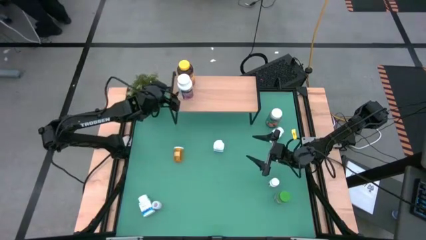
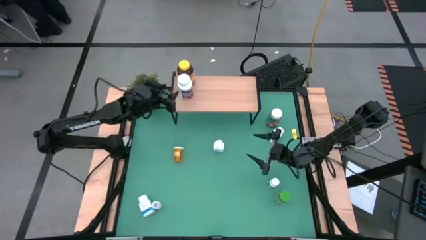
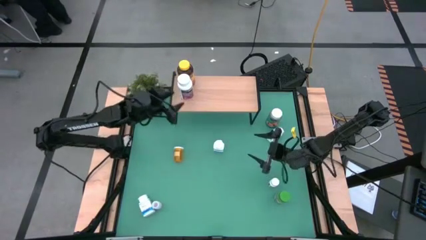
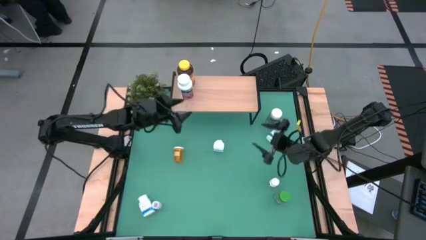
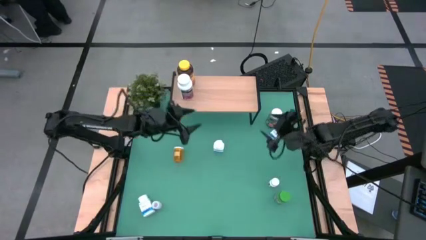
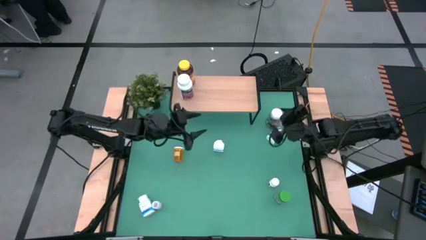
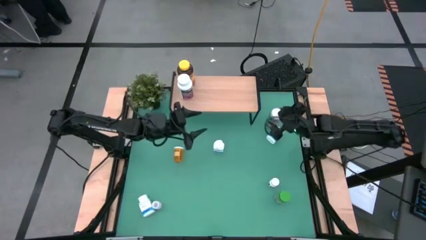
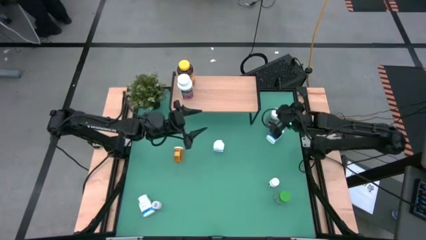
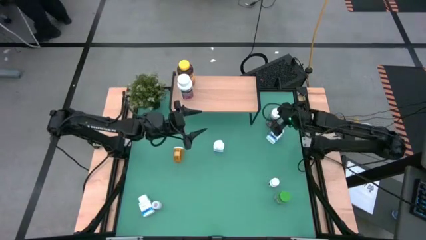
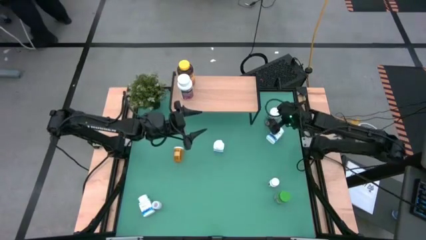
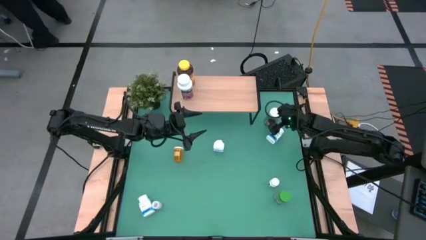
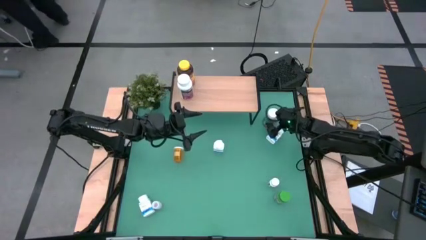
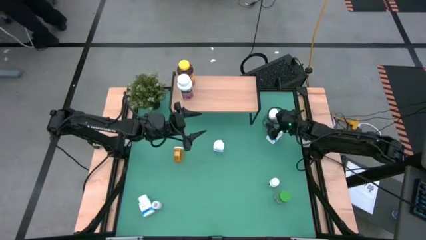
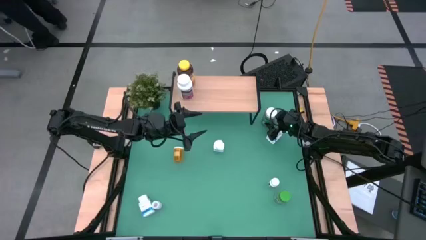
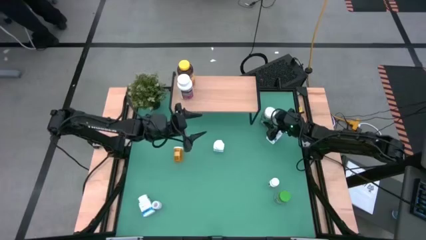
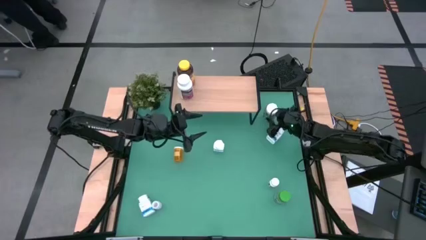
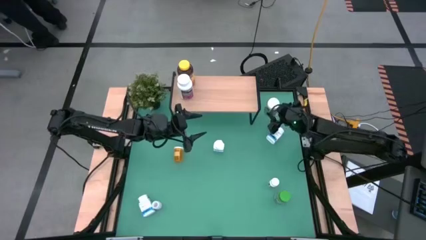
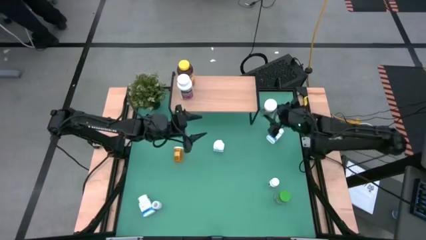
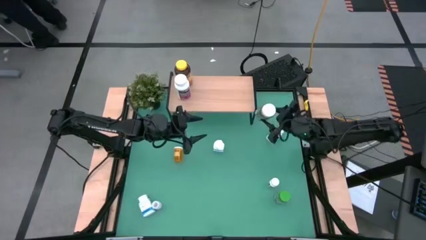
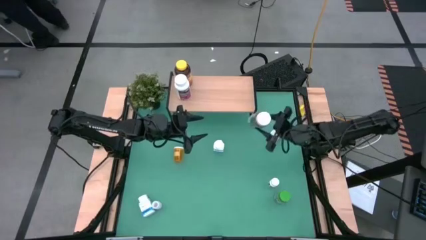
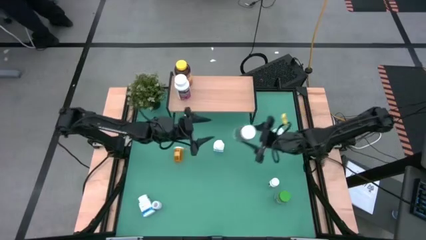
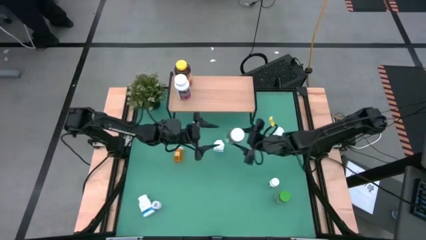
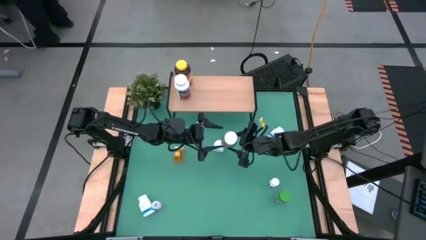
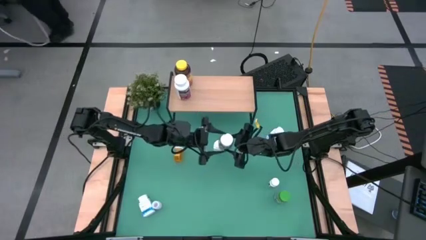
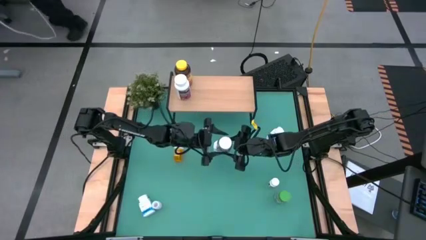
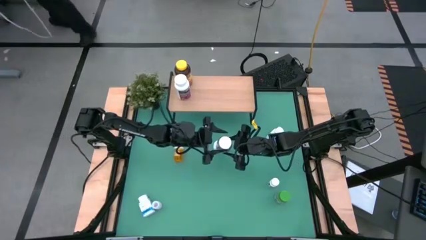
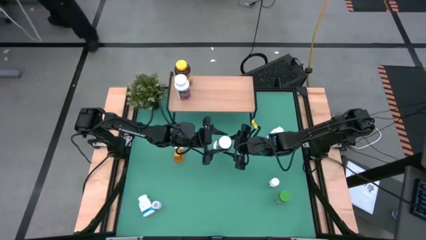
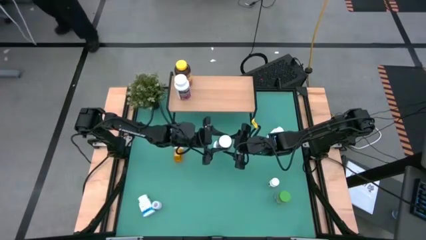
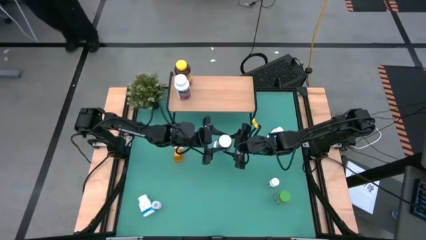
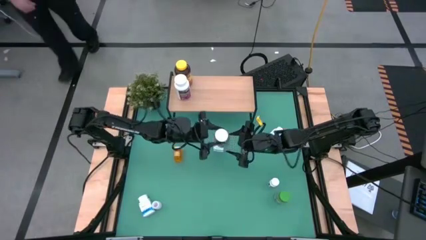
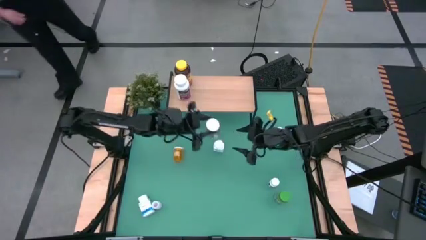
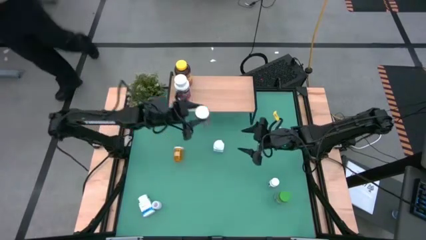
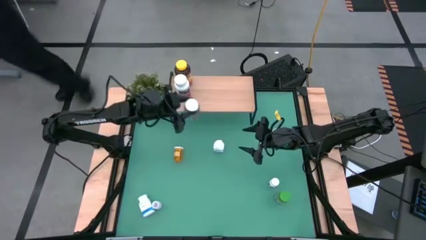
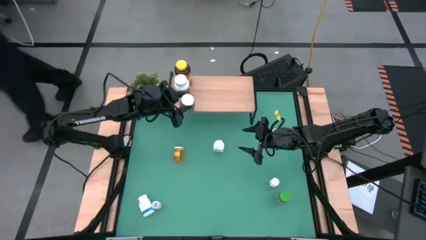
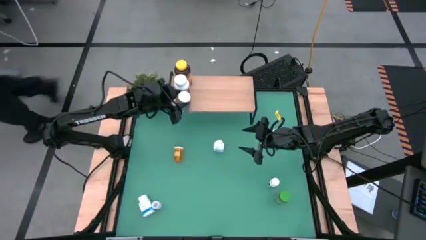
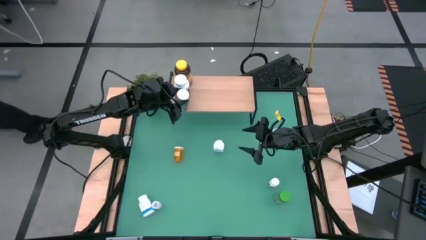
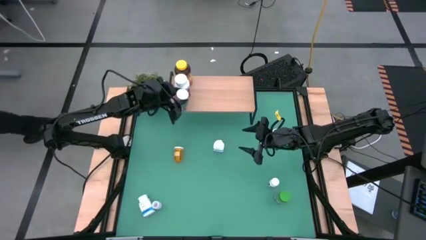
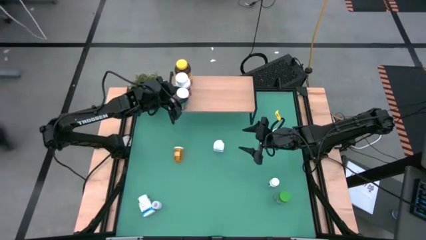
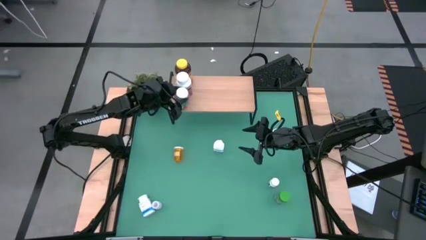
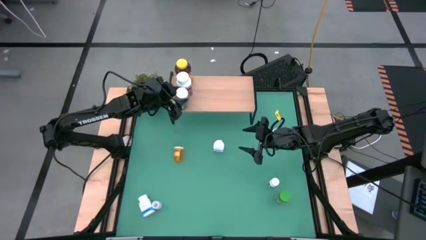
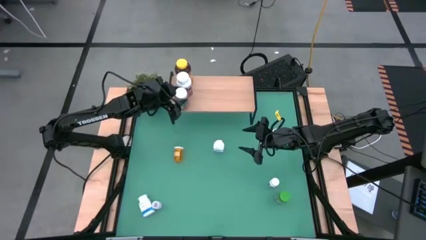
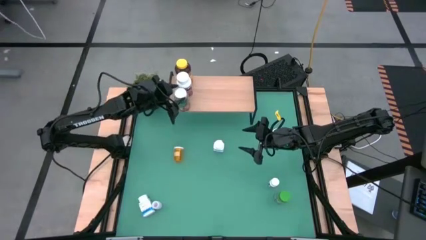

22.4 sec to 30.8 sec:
Task: Pick and place medicine bottles onto shelf by color
Put the green transparent pill bottle on the shelf

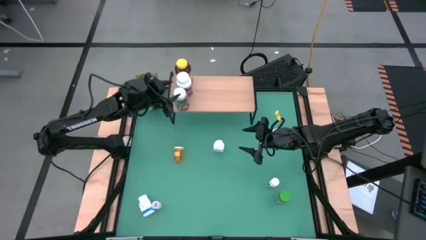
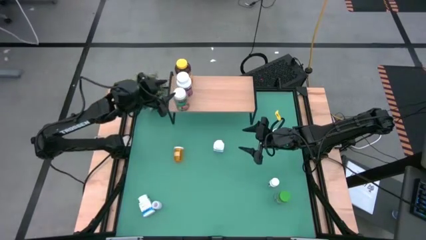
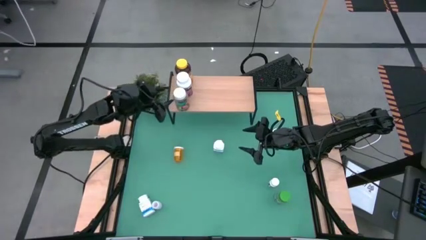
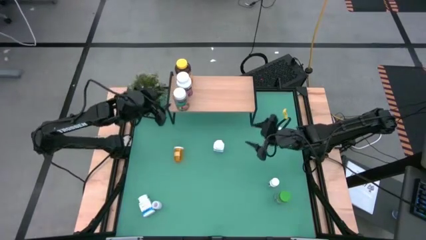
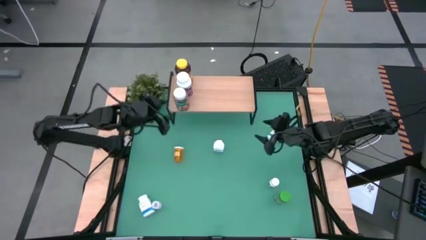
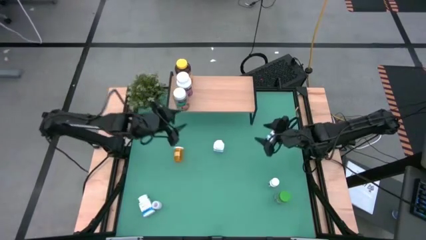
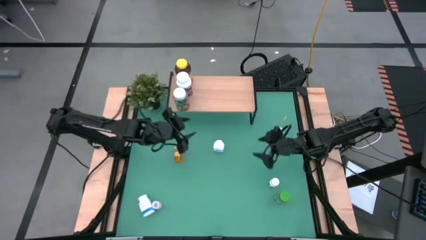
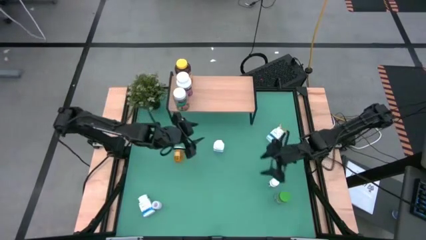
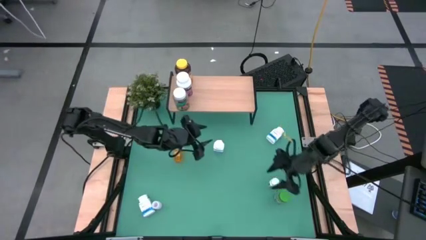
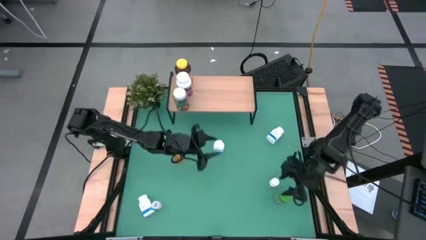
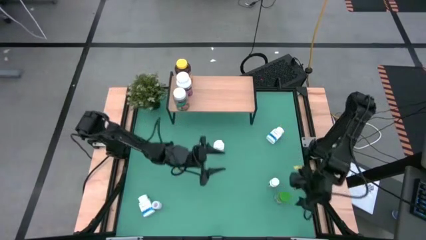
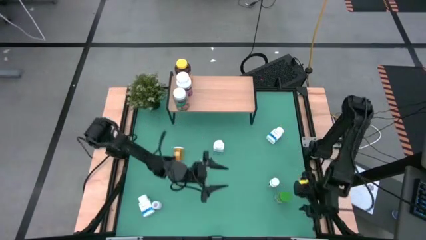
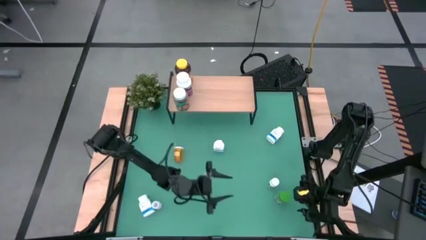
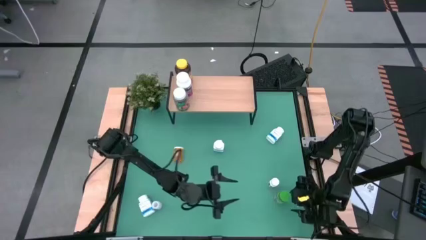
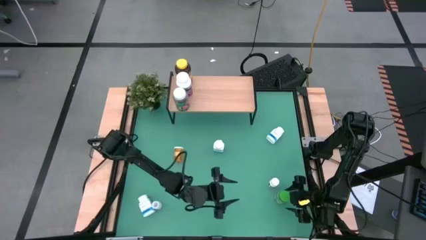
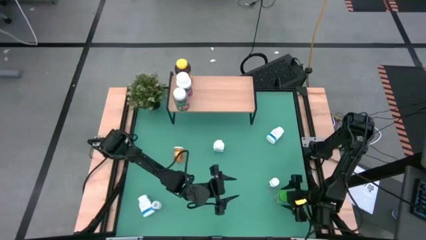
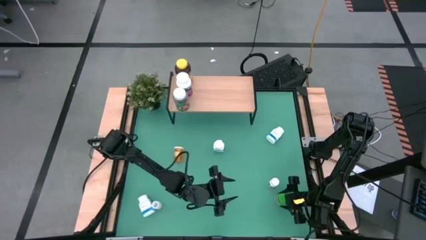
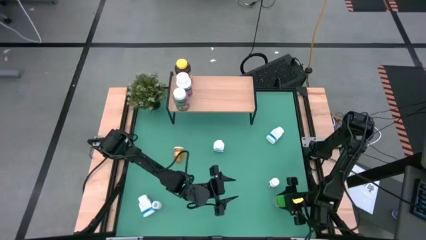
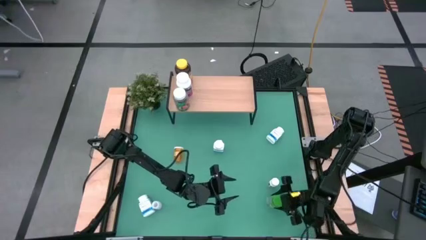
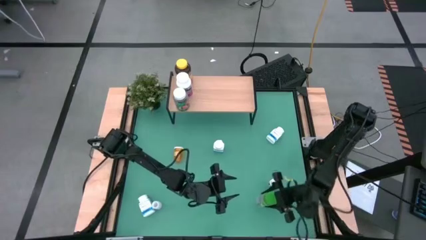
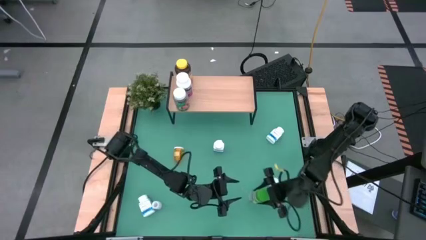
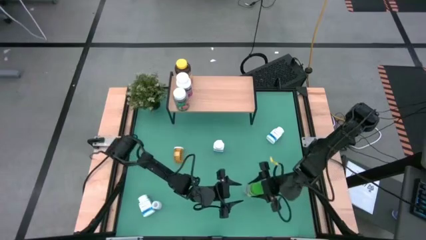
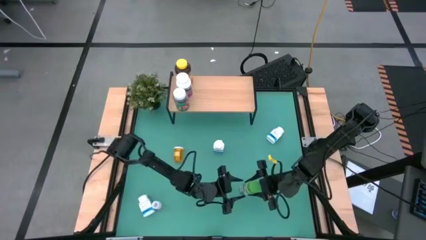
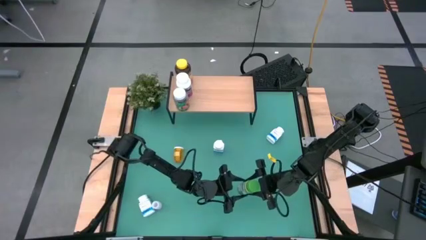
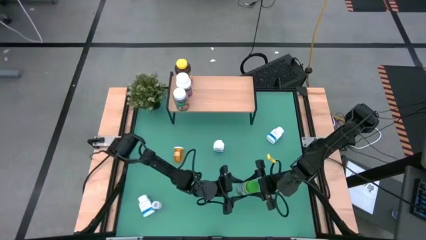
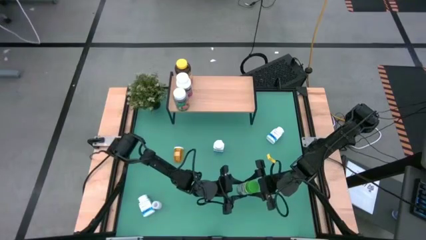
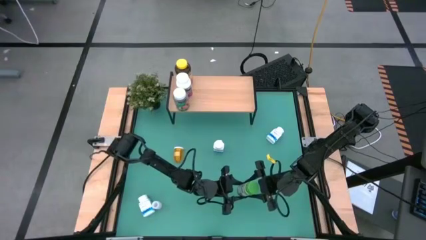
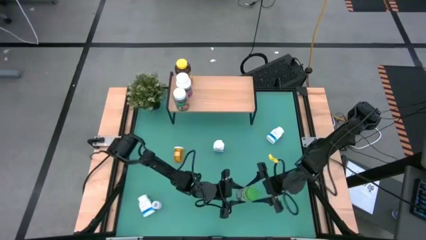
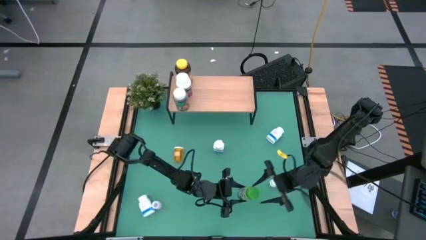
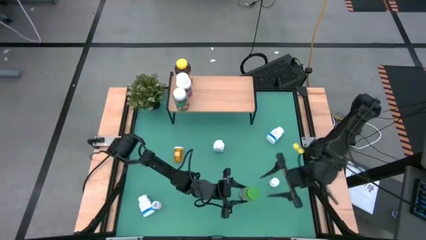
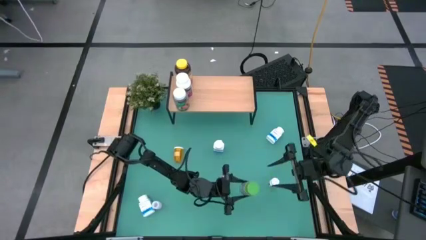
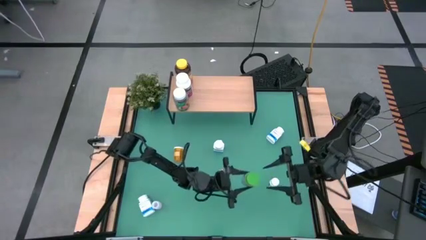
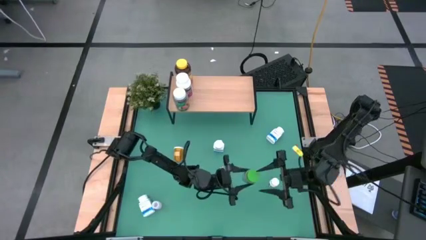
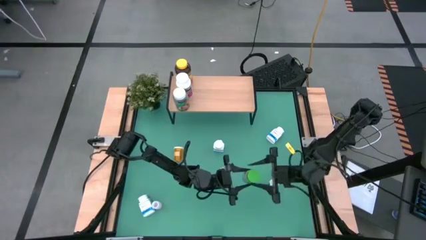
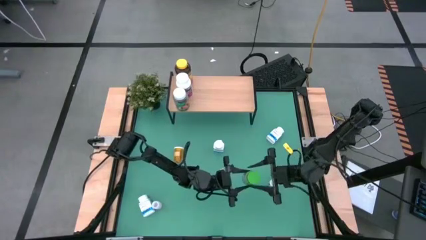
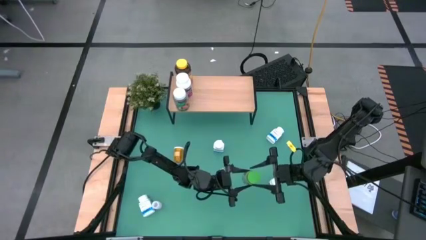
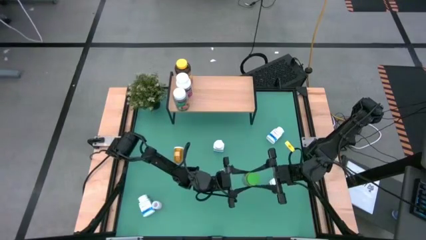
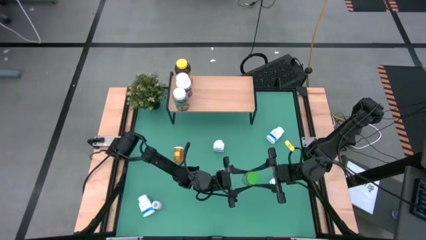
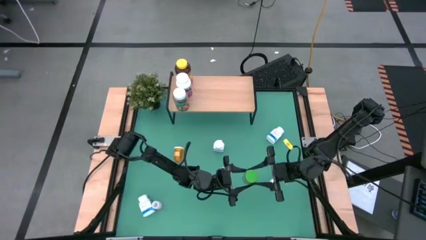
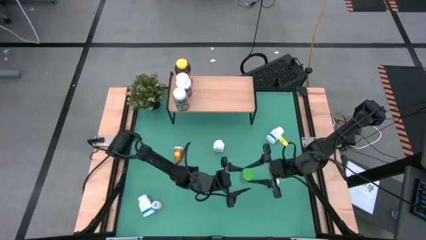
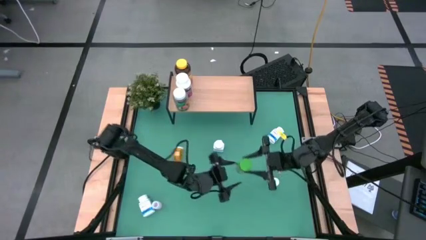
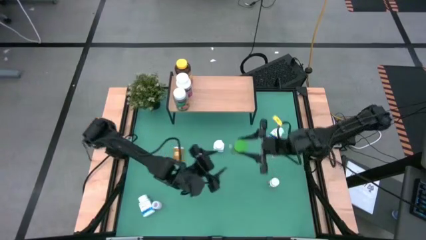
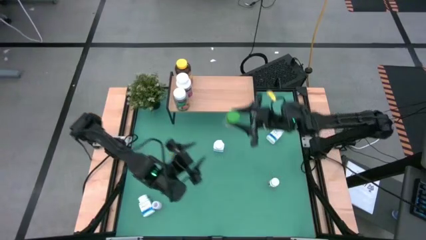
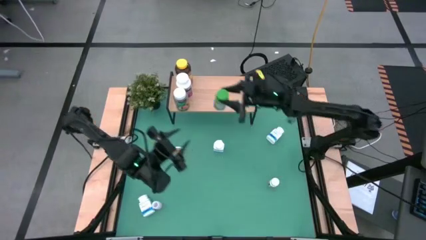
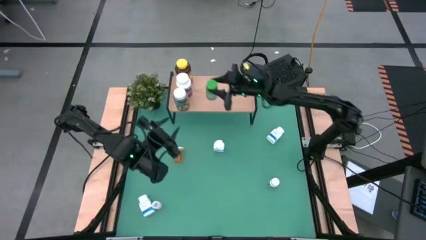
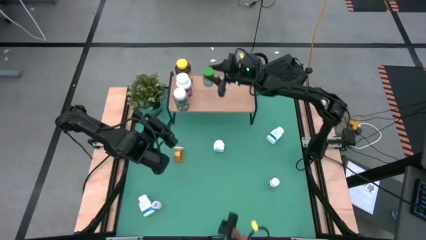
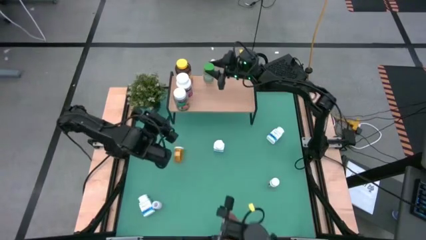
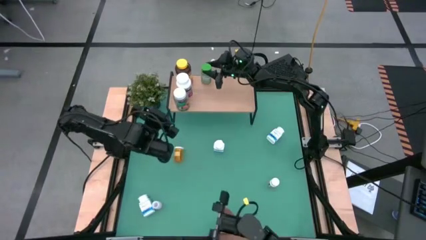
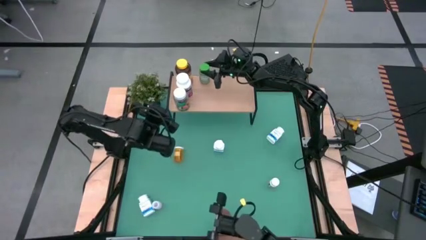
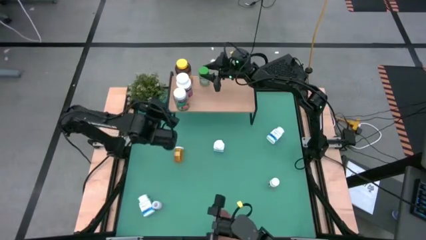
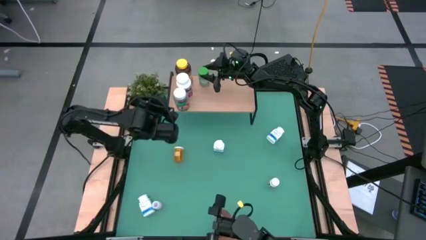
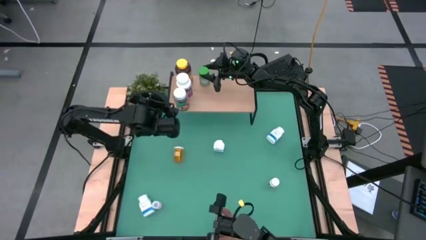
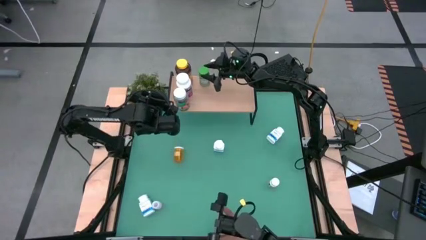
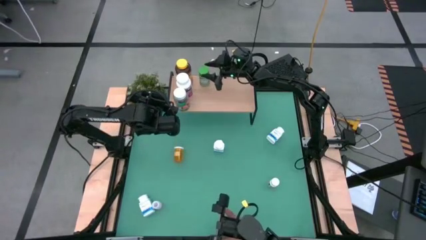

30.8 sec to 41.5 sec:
Put the green pill bottle on the shelf
